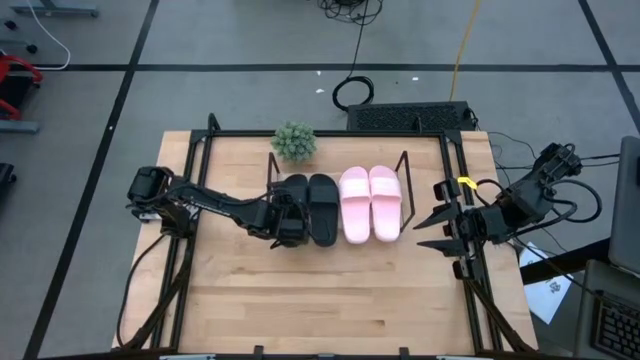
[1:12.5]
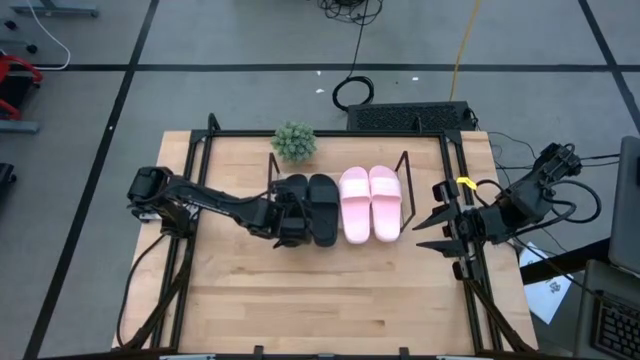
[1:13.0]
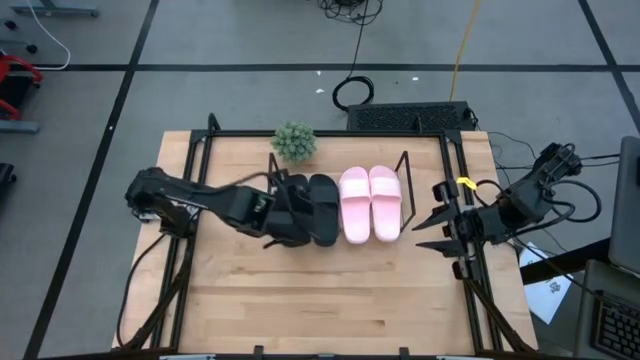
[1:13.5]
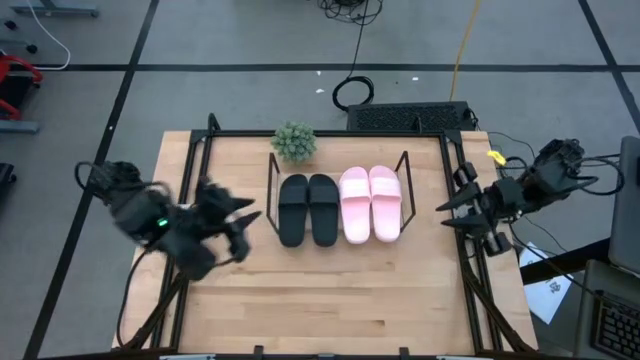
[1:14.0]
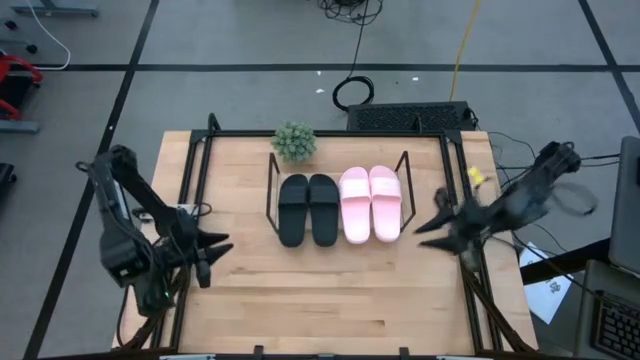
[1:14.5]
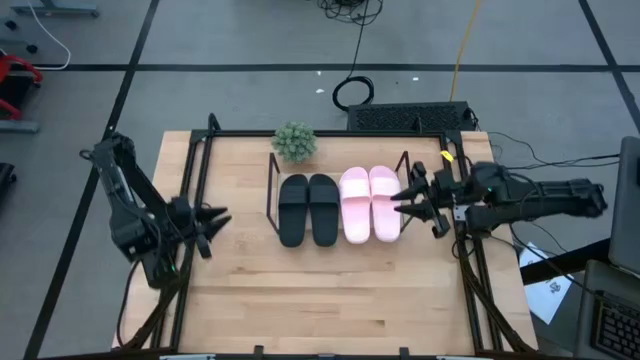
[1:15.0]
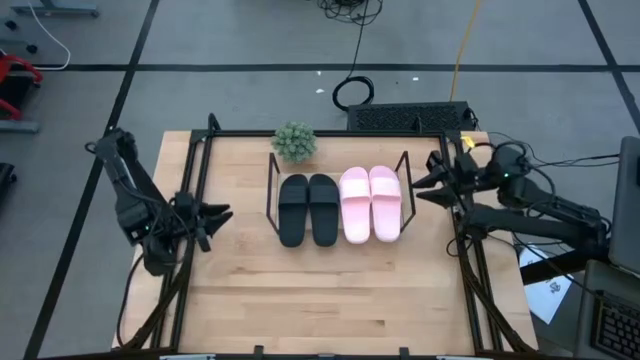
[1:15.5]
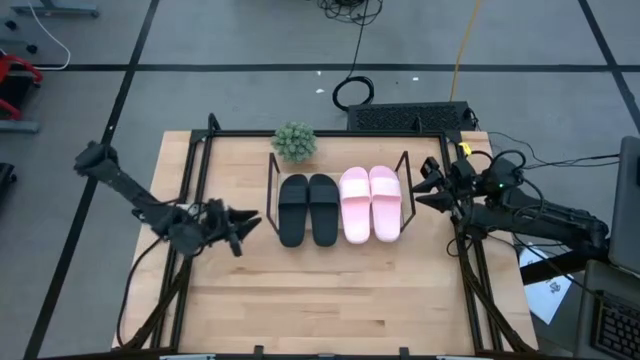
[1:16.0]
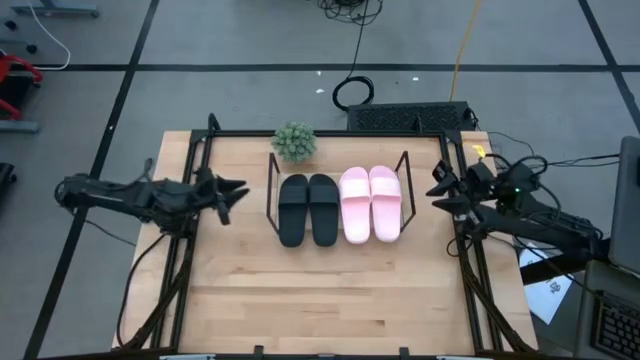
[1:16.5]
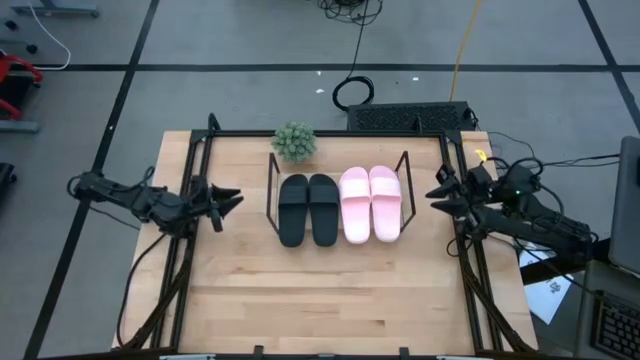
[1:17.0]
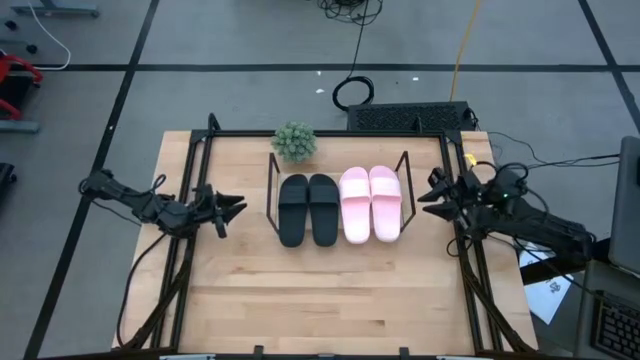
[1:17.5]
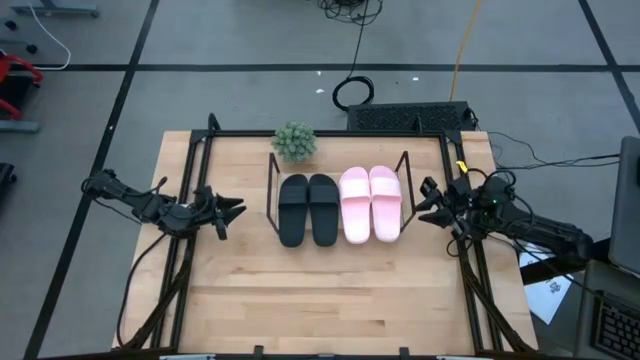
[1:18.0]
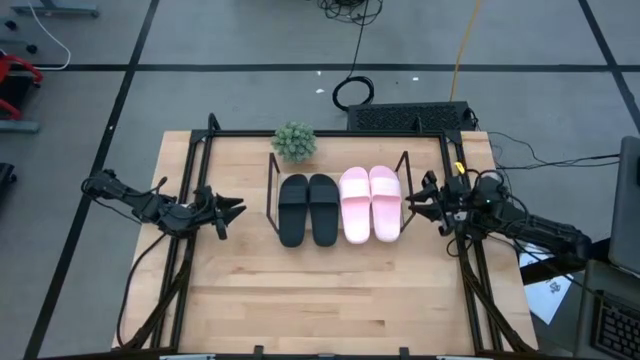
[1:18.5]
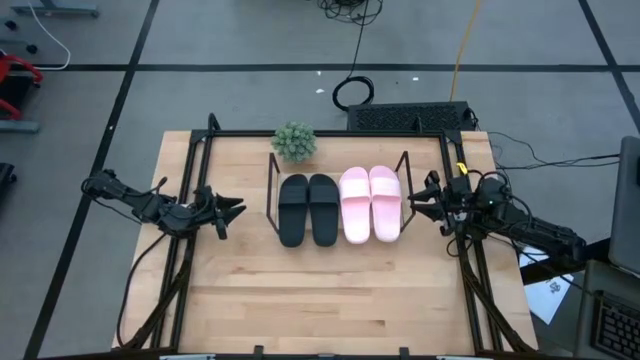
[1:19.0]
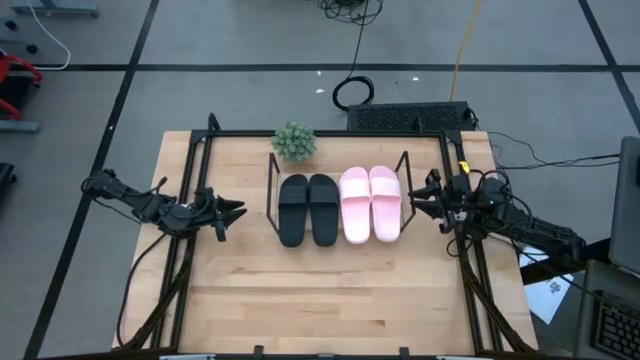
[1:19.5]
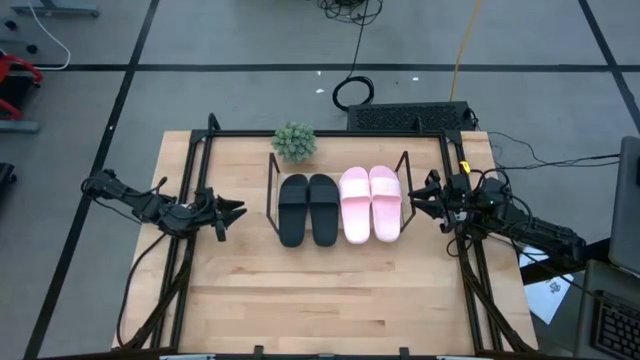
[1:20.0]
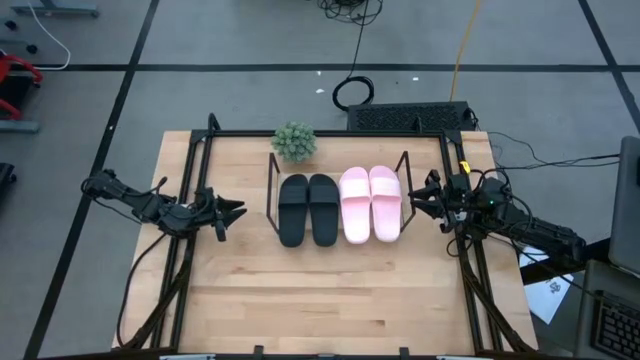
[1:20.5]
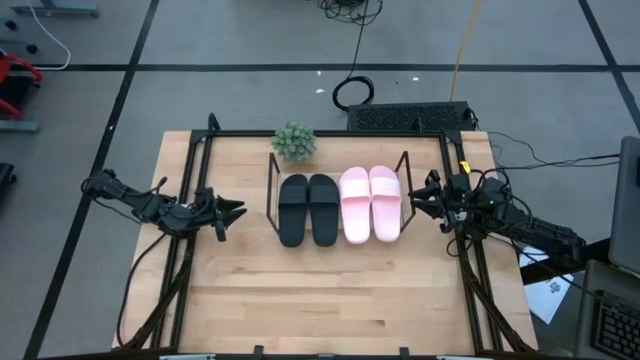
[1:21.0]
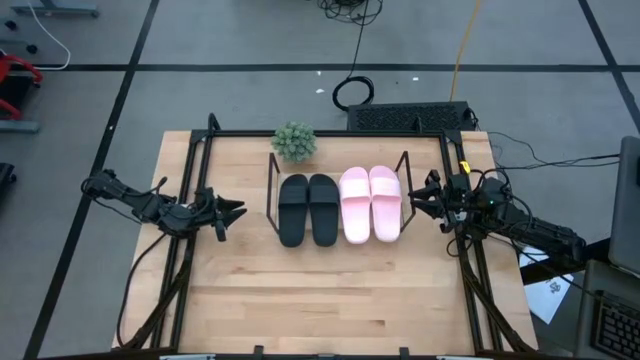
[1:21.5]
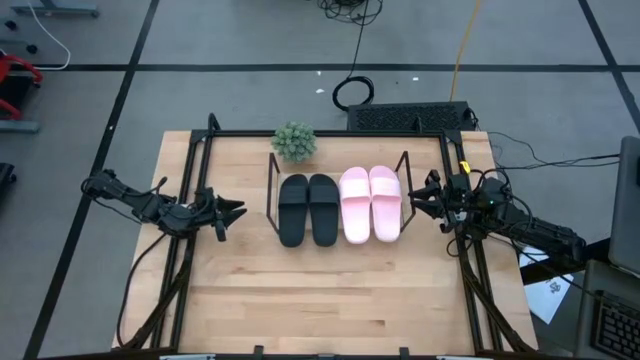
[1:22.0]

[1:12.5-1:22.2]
Task: Pick and place slides into the shelf
Return to Home Position

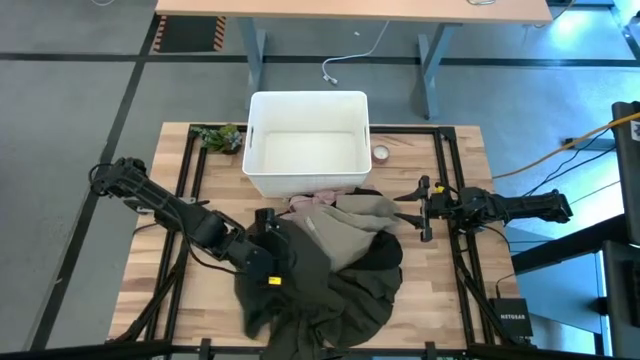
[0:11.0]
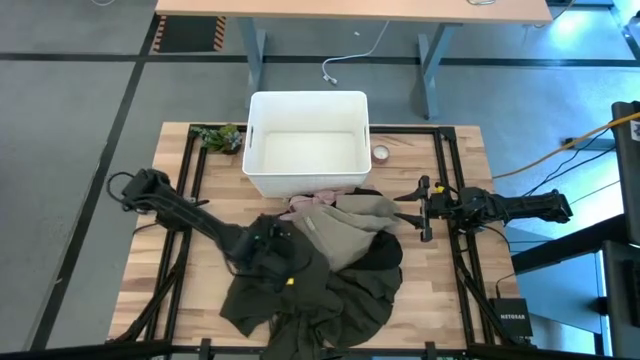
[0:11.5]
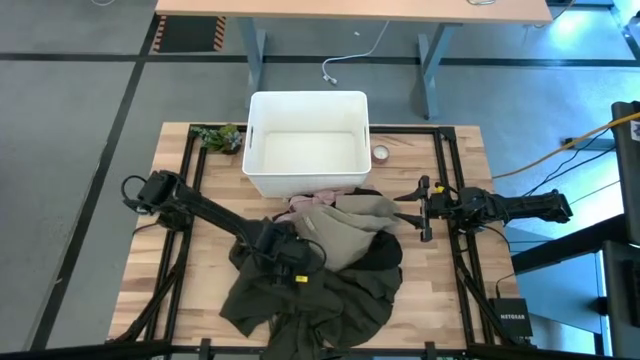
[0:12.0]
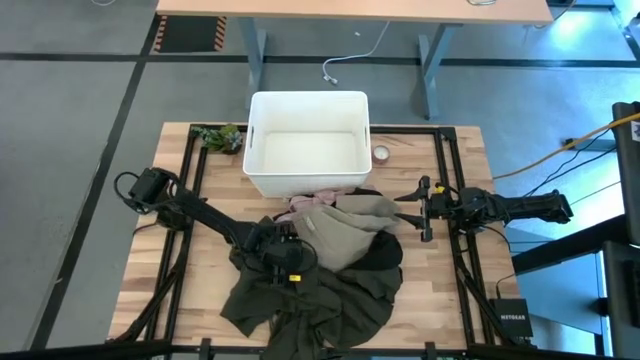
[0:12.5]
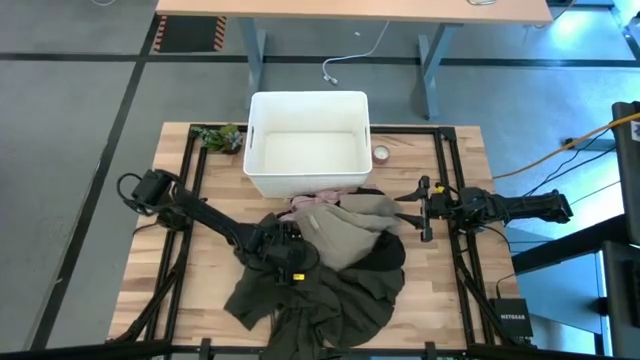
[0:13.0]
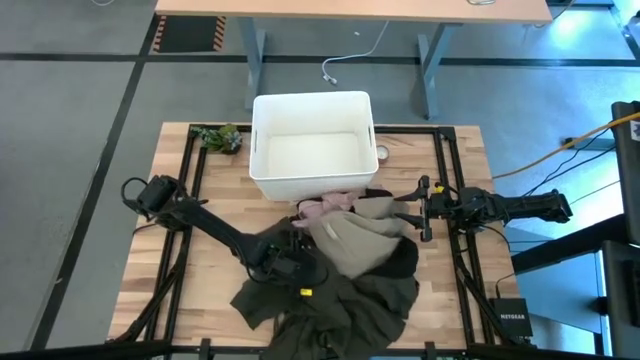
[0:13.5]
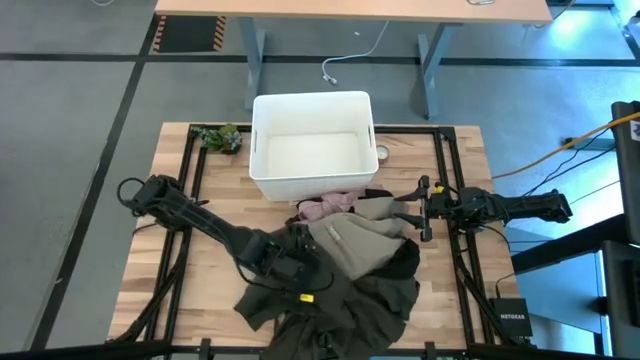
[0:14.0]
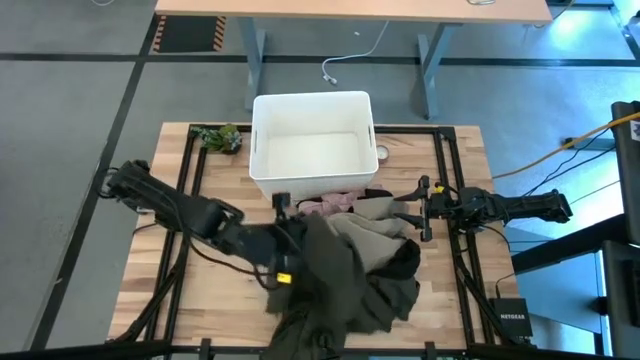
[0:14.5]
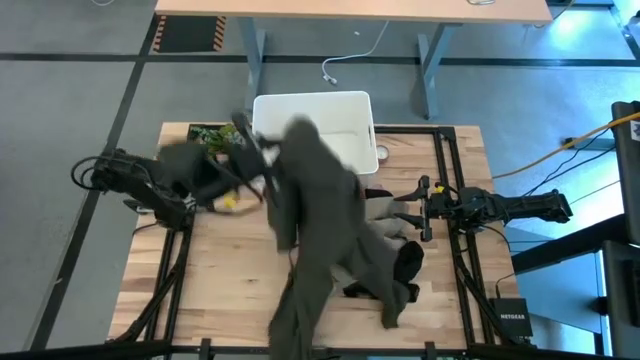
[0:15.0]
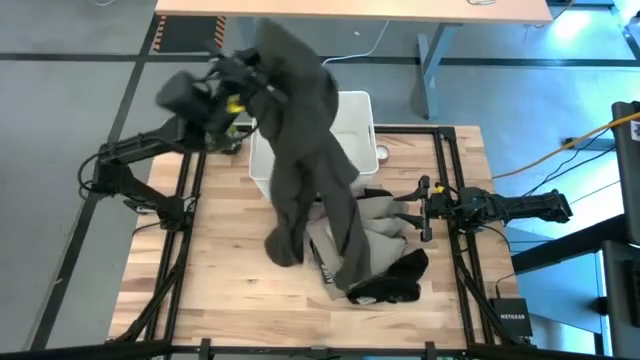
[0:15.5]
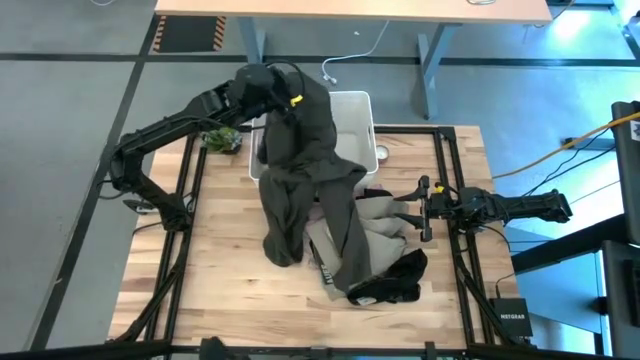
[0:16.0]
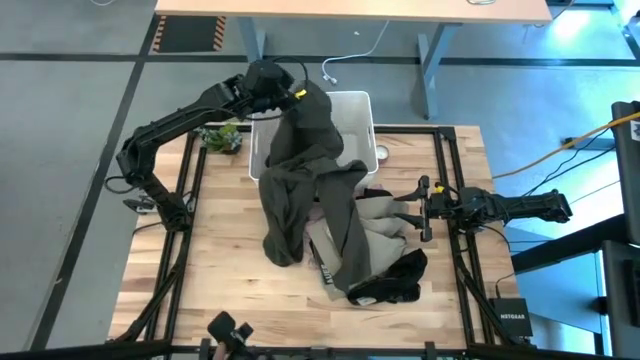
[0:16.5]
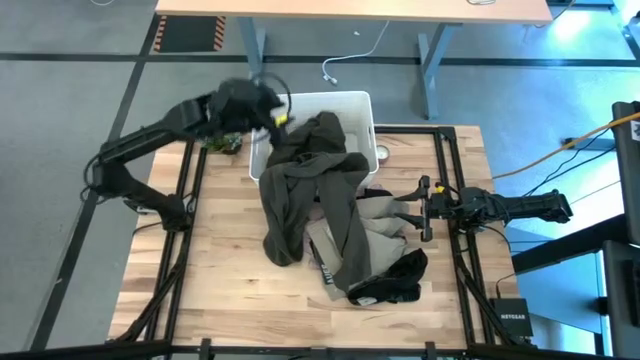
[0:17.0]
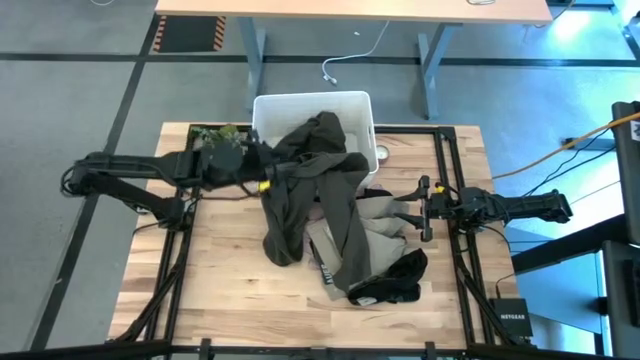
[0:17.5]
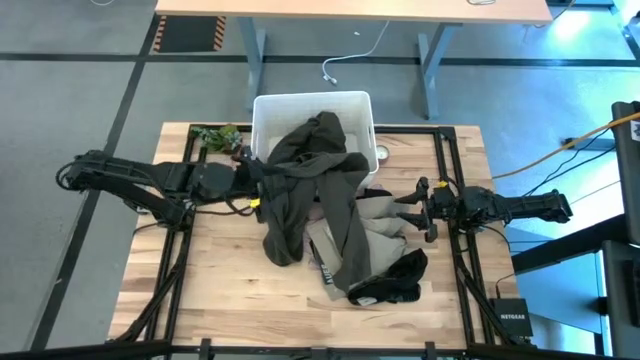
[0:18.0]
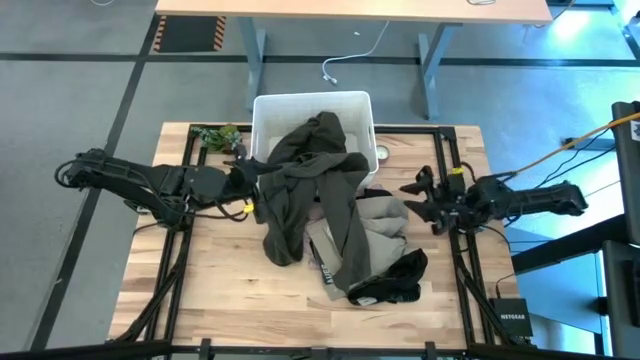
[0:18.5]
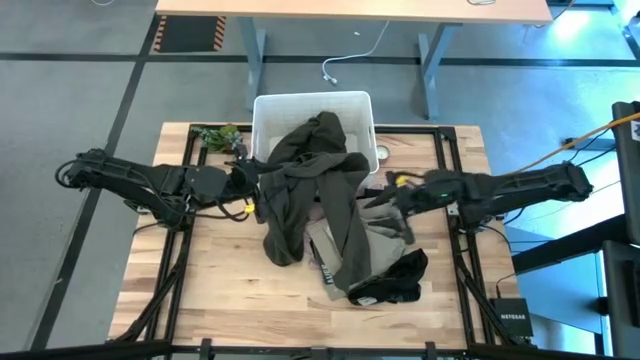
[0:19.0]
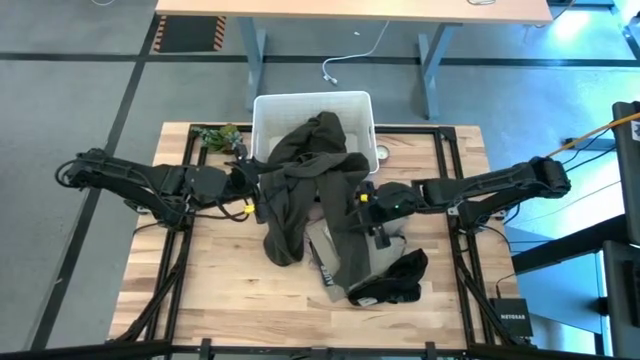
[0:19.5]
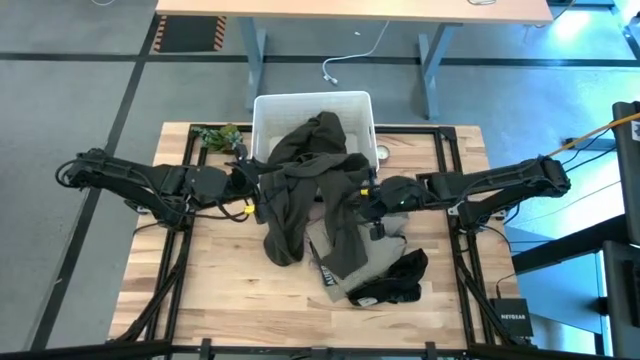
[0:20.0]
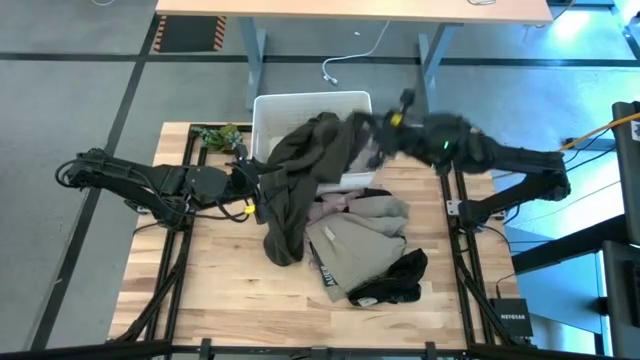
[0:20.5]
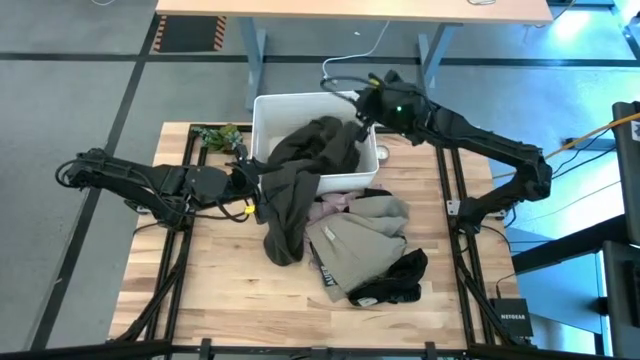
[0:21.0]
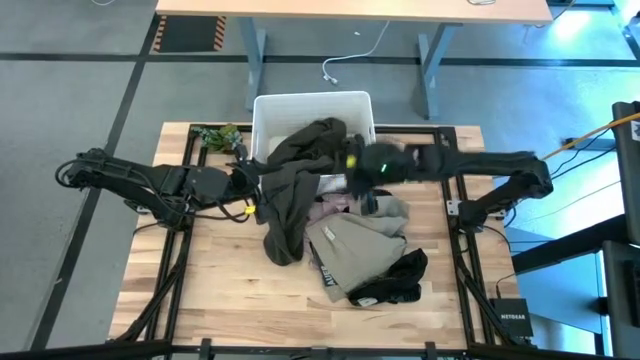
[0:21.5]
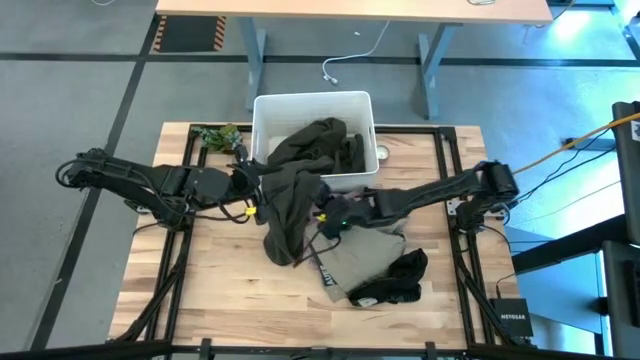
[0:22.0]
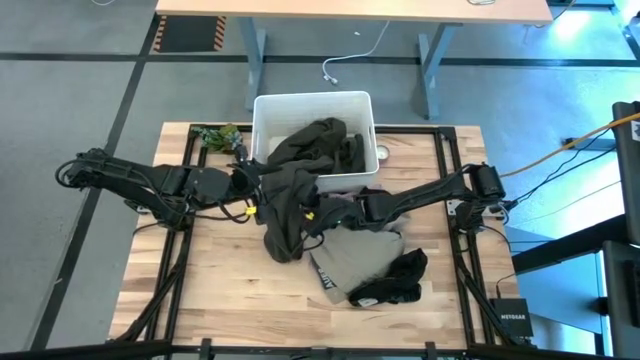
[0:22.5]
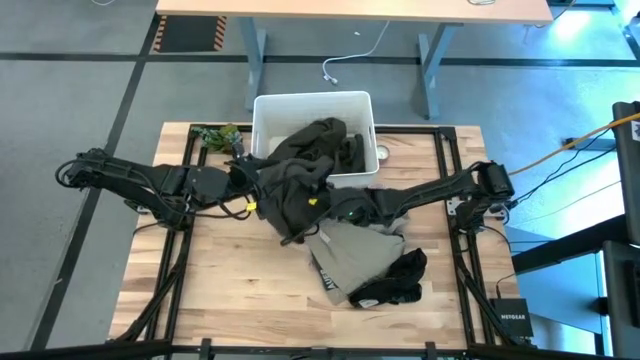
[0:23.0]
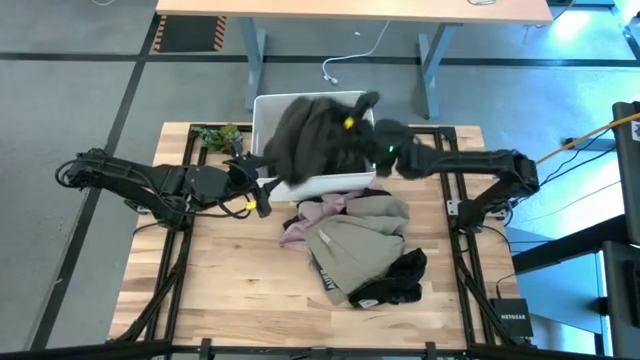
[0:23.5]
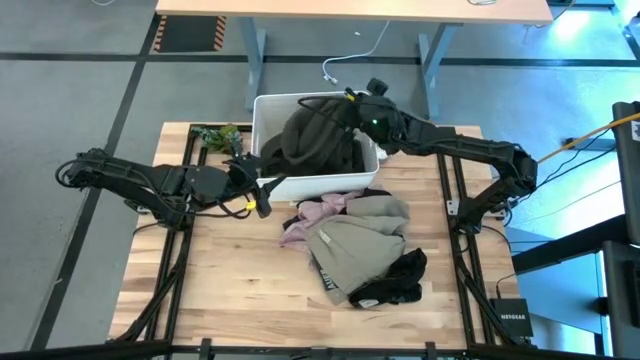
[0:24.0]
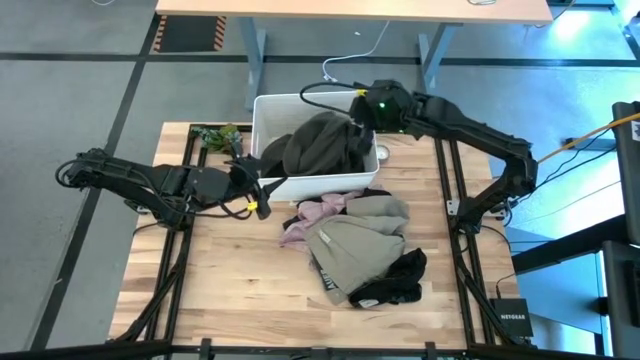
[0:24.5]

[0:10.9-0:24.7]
Task: Sort clothes
Put the black jacket into the white bin
